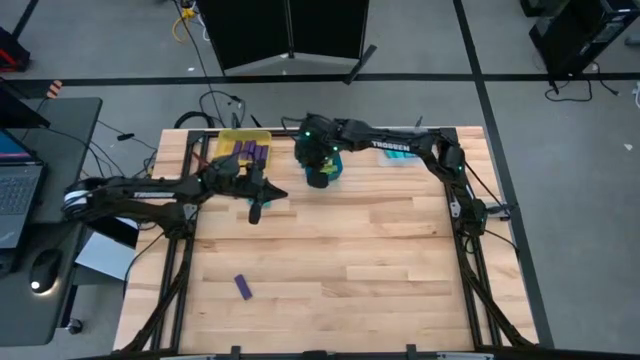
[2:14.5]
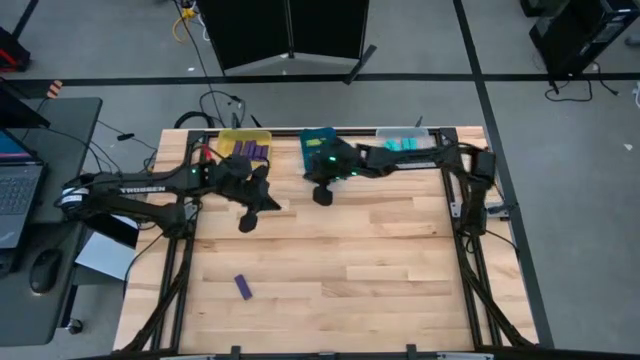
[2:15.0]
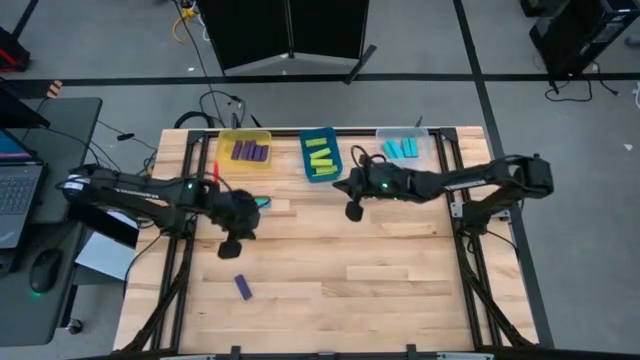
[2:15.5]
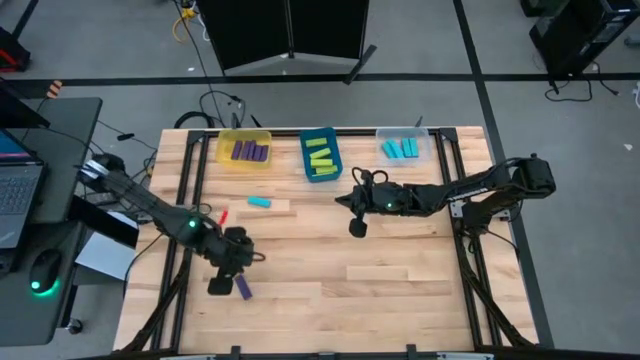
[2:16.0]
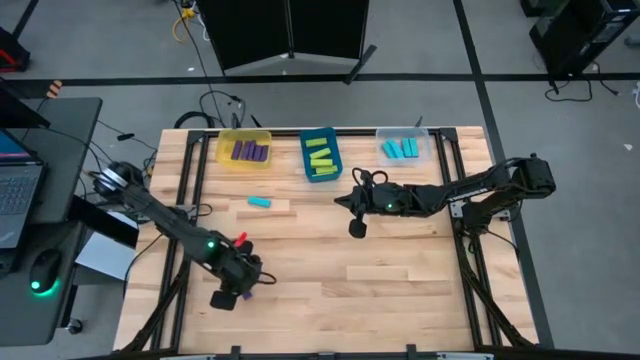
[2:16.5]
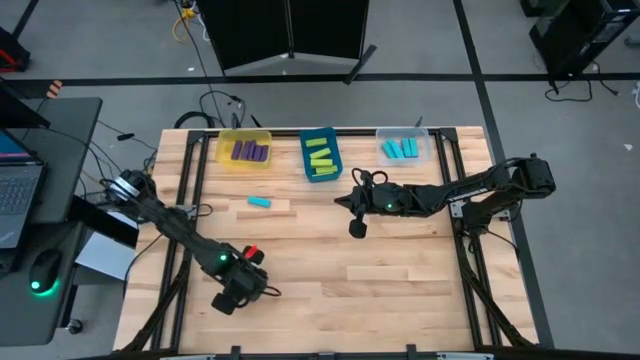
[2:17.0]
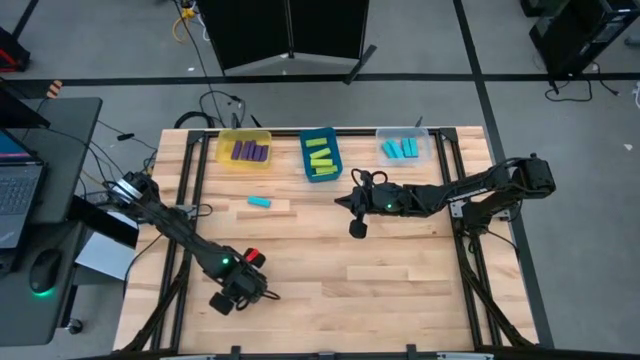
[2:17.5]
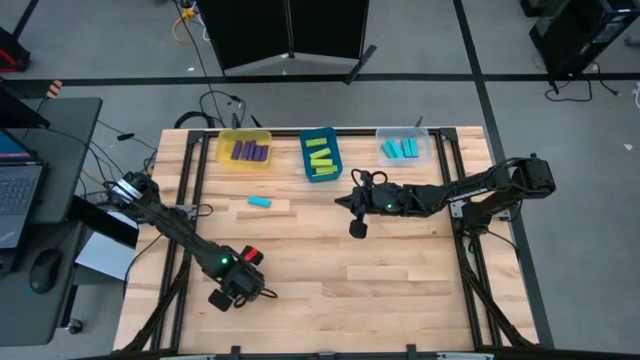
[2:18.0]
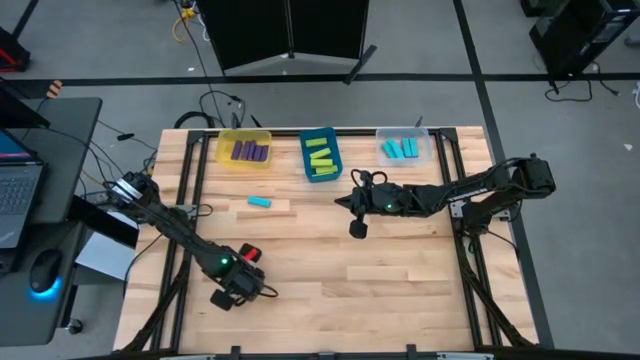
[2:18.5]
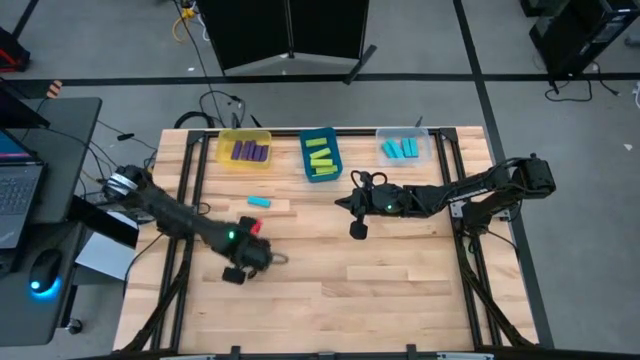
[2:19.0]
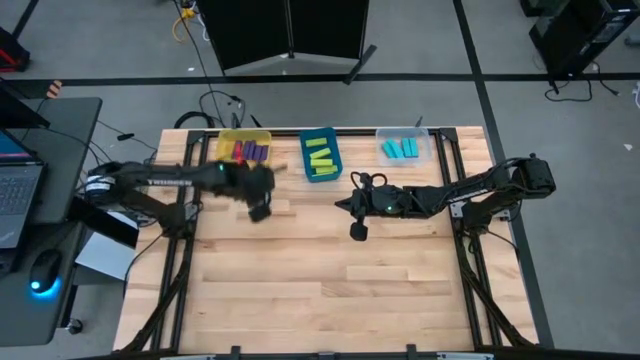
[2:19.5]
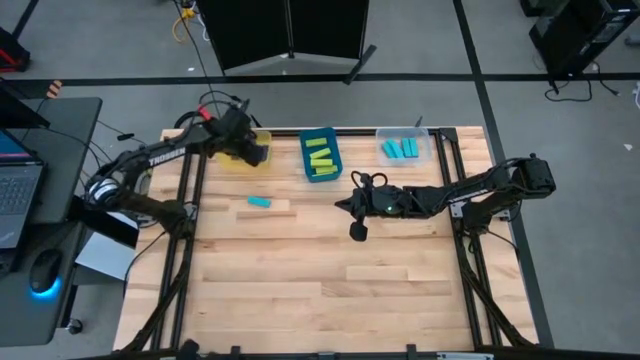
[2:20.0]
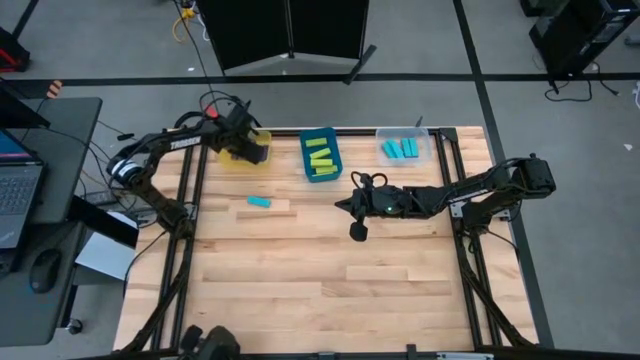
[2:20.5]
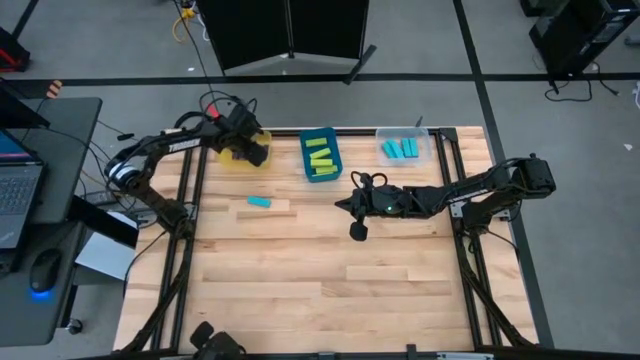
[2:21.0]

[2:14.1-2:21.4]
Task: Sort blocks
Put the violet block into the yellow bin

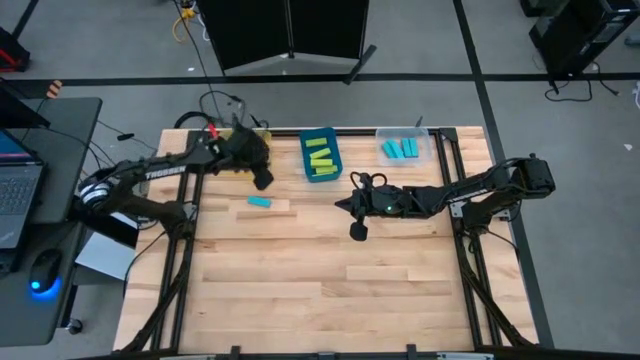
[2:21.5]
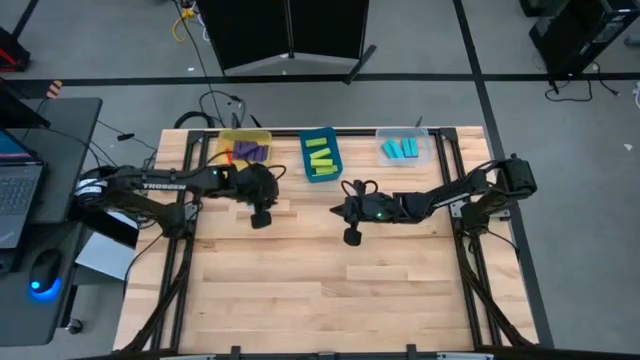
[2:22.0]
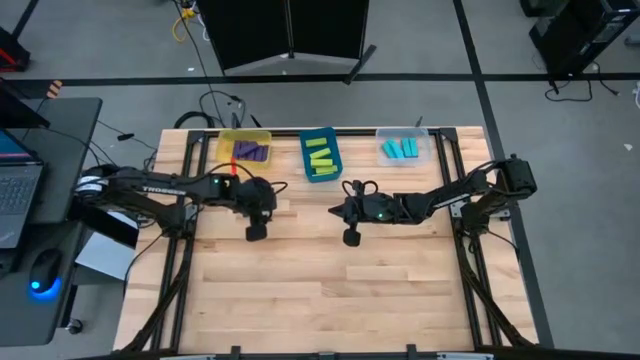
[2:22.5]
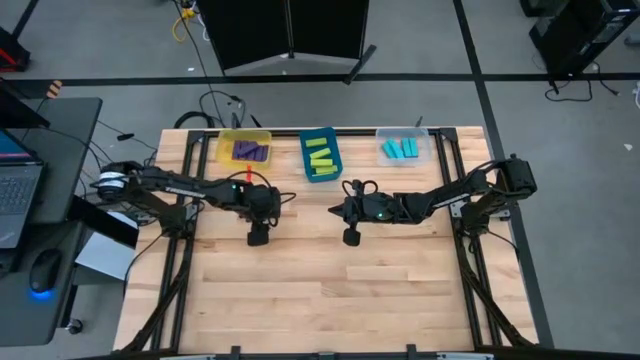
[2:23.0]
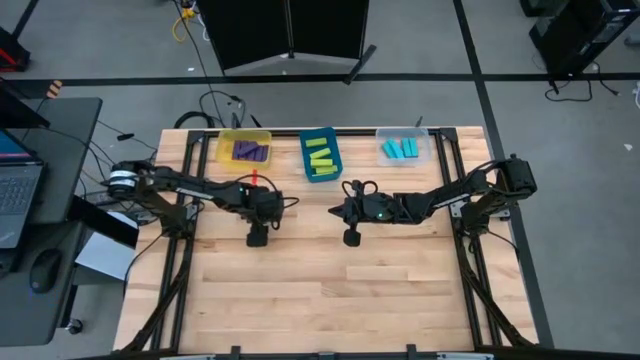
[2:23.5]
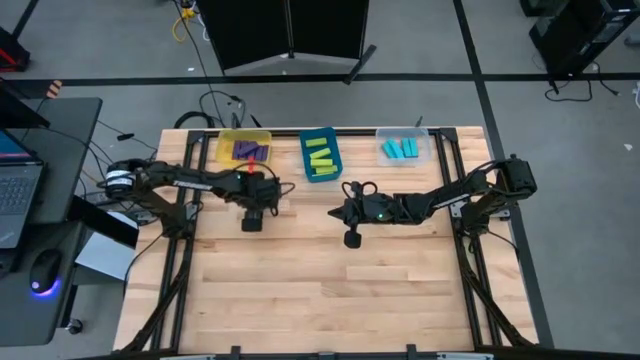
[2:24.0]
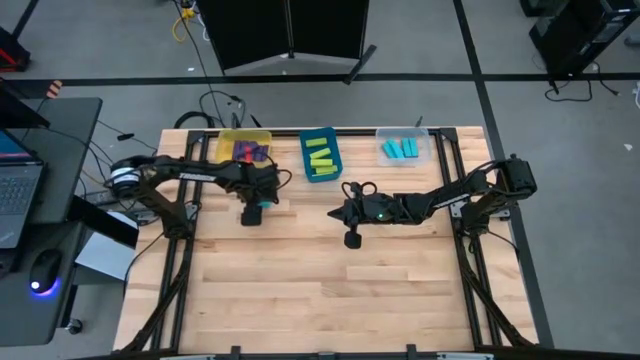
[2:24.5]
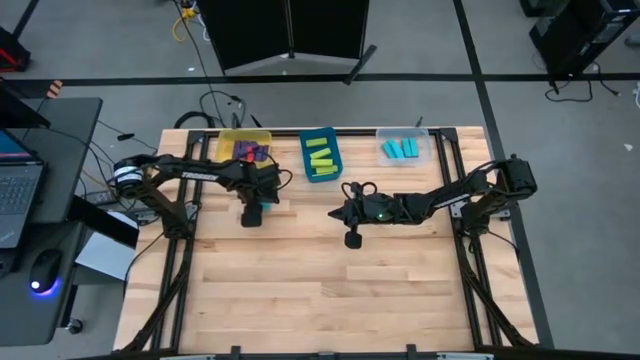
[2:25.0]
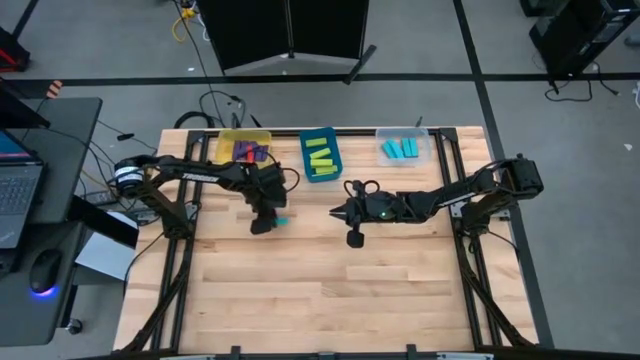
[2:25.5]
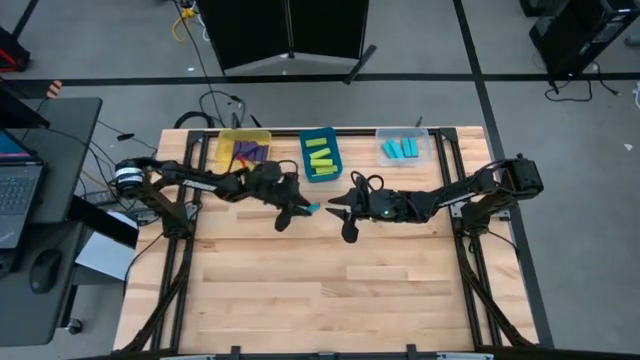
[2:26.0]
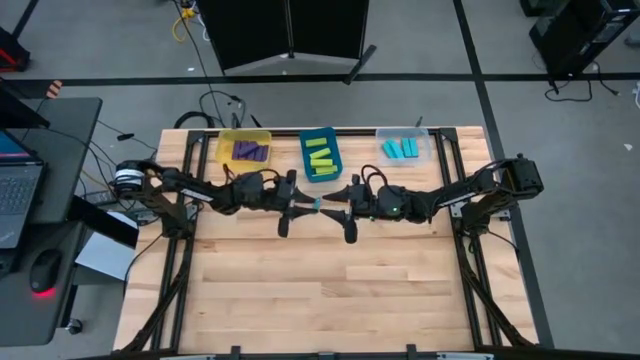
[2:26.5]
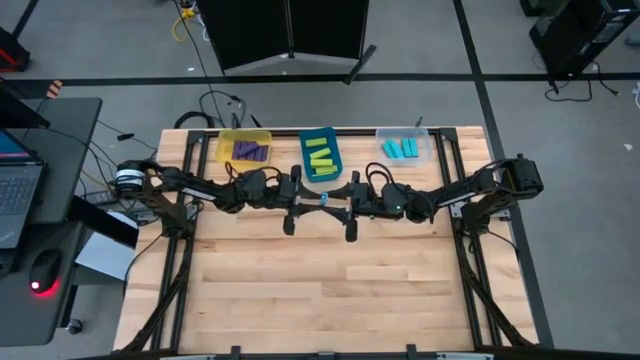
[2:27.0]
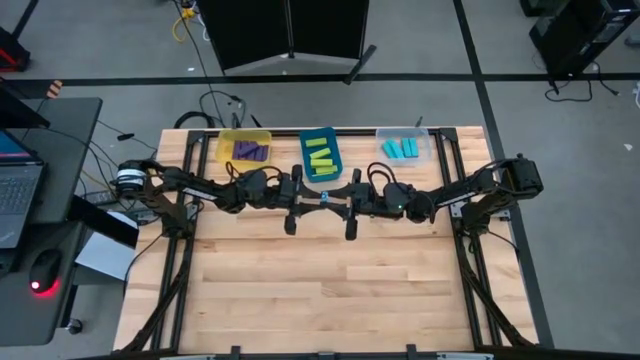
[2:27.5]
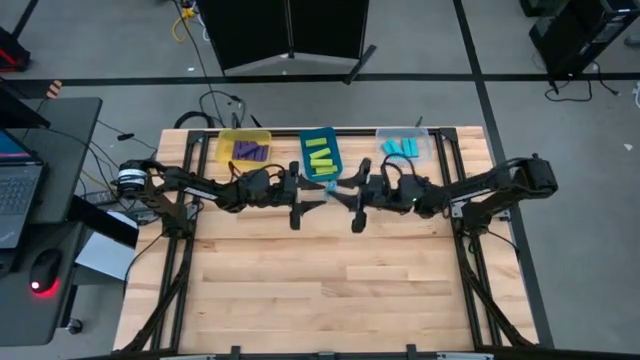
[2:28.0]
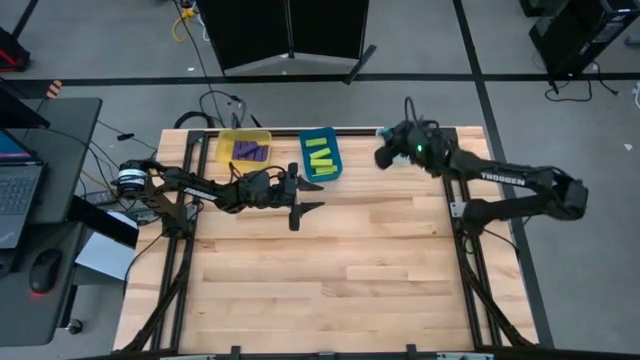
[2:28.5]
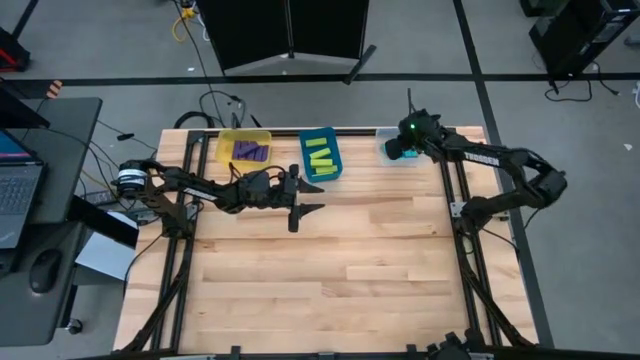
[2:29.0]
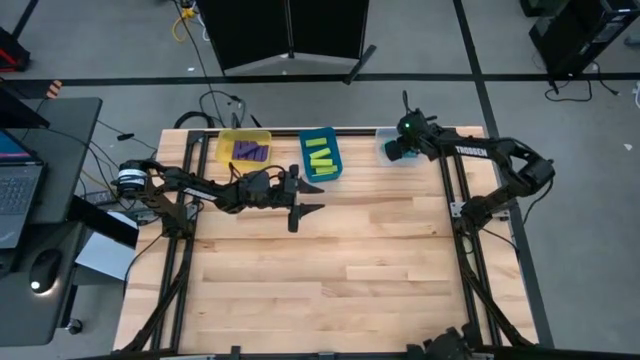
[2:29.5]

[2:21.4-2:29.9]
Put the blue block into the transparent bin

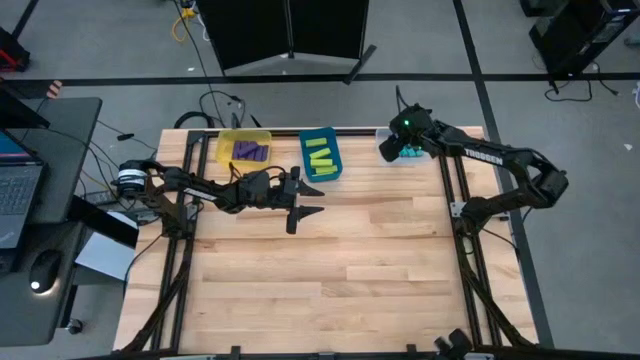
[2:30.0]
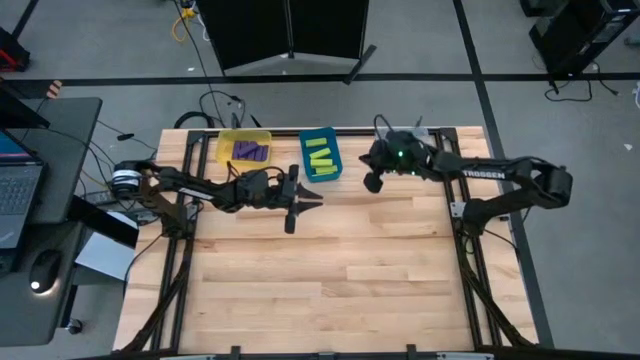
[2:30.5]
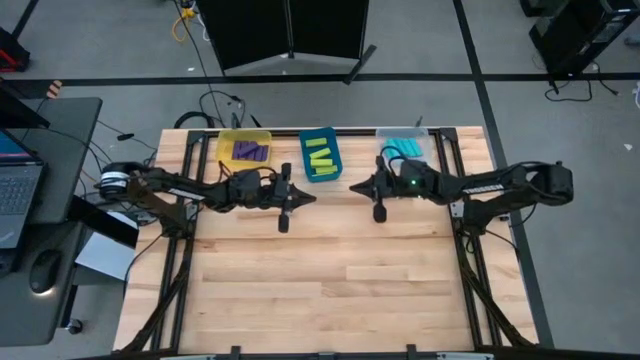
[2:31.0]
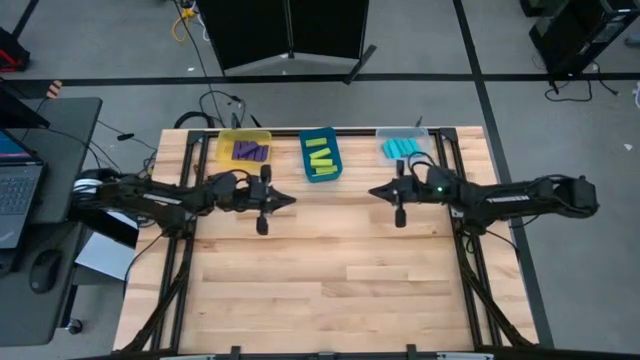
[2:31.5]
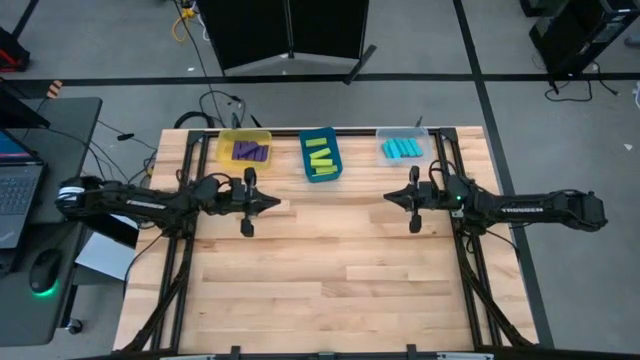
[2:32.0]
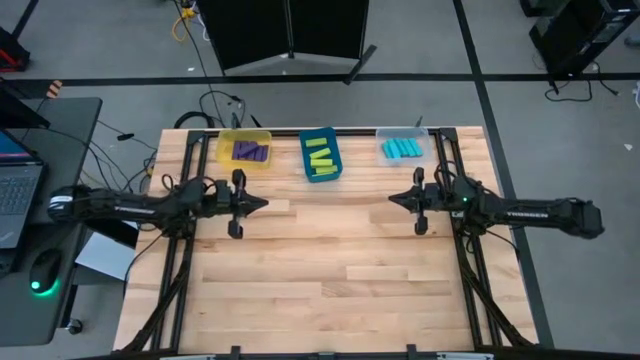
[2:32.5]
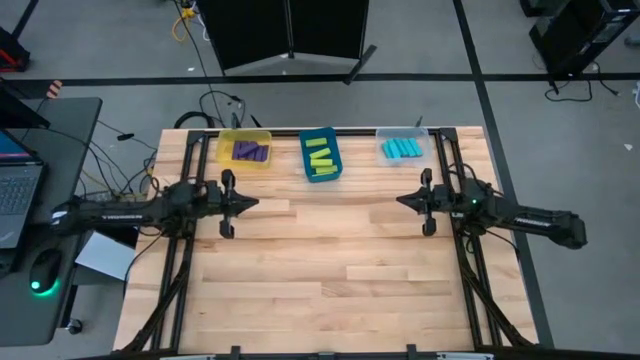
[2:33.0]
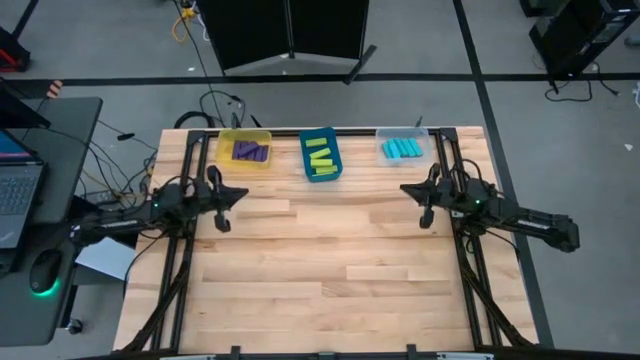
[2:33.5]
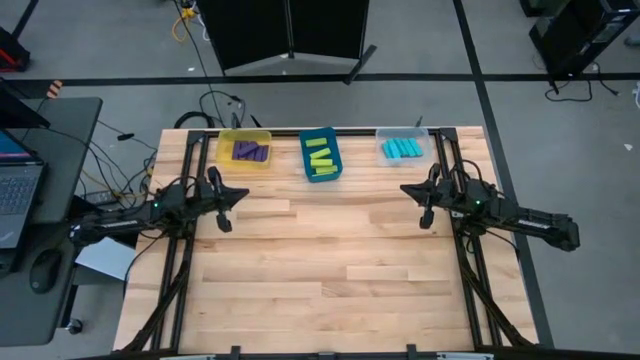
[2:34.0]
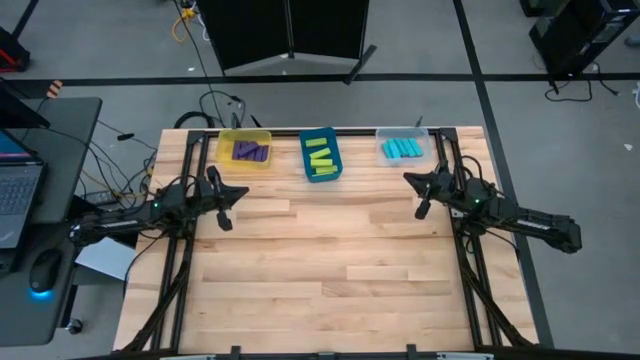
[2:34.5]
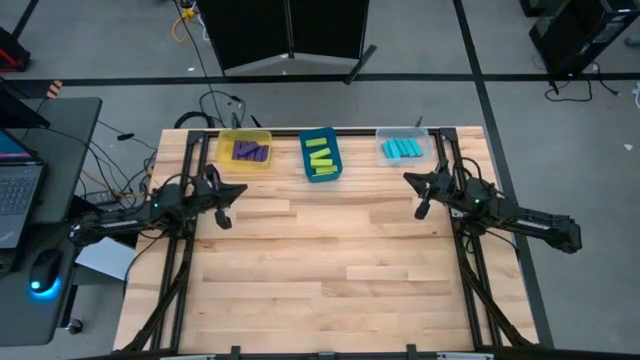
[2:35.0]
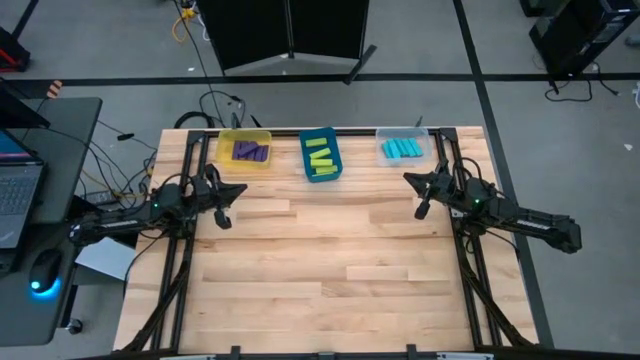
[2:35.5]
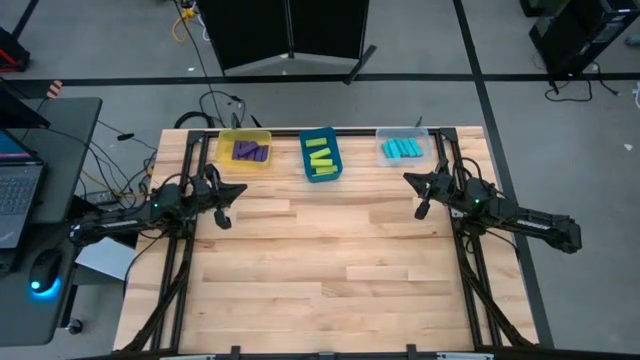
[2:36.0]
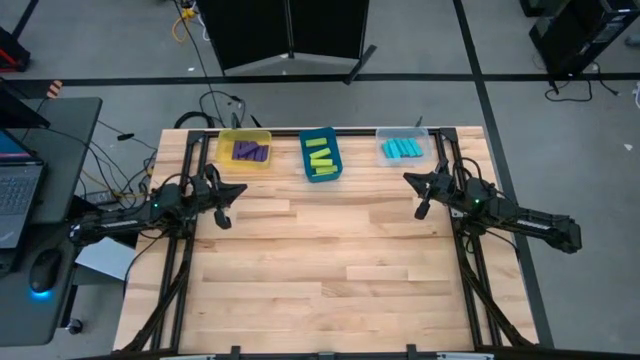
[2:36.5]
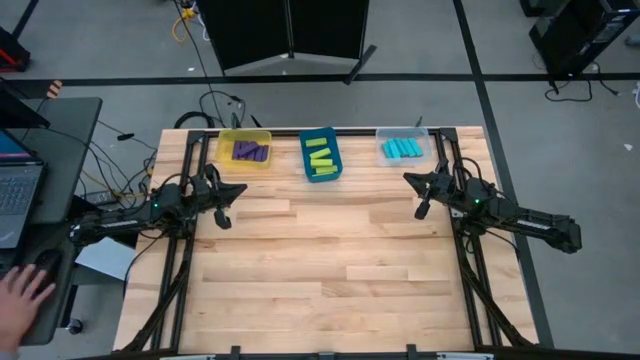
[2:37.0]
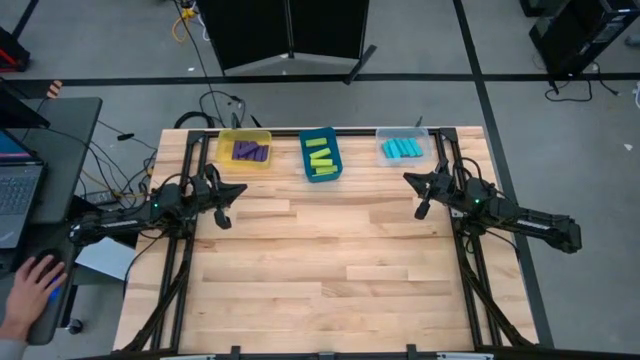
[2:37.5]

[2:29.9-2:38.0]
Return to Home Position
